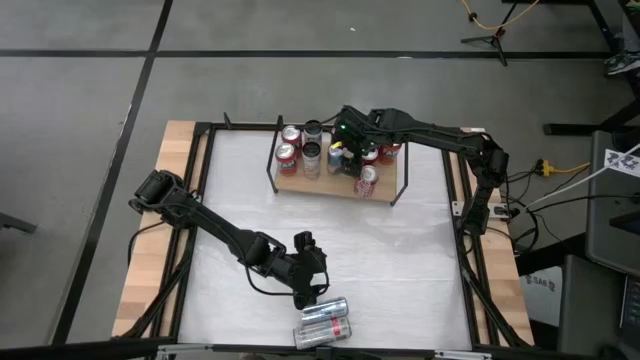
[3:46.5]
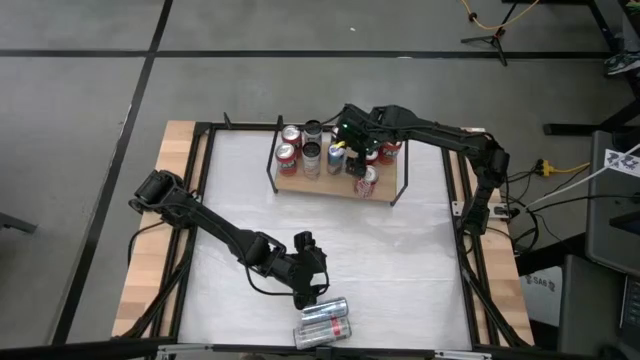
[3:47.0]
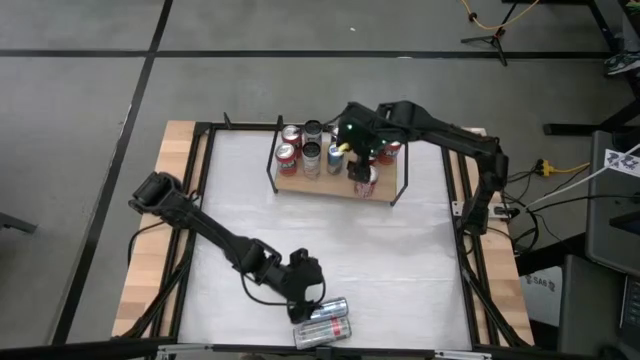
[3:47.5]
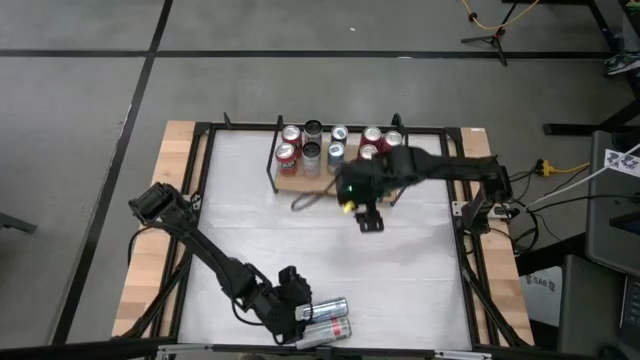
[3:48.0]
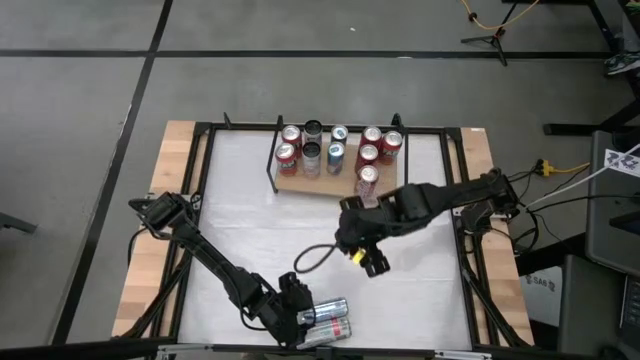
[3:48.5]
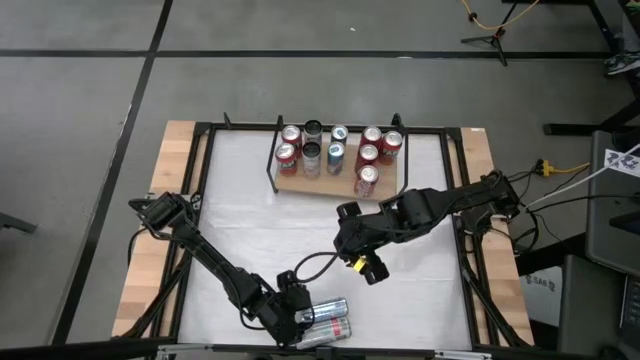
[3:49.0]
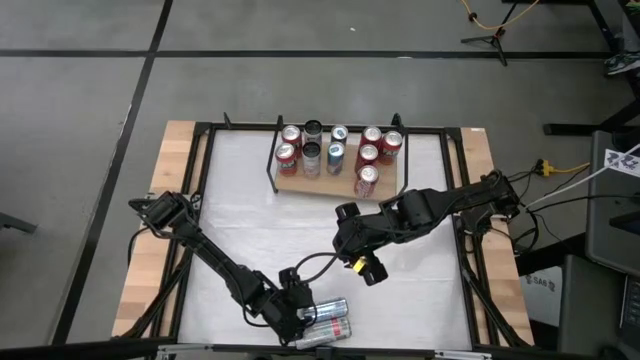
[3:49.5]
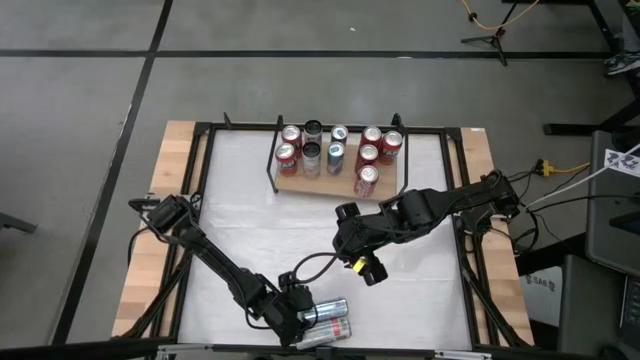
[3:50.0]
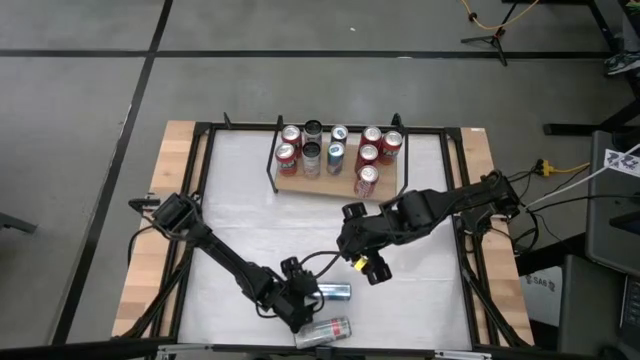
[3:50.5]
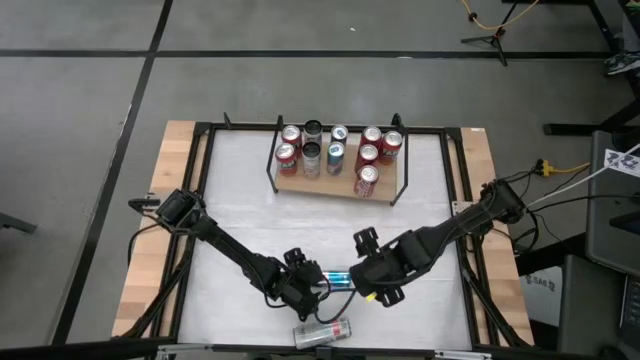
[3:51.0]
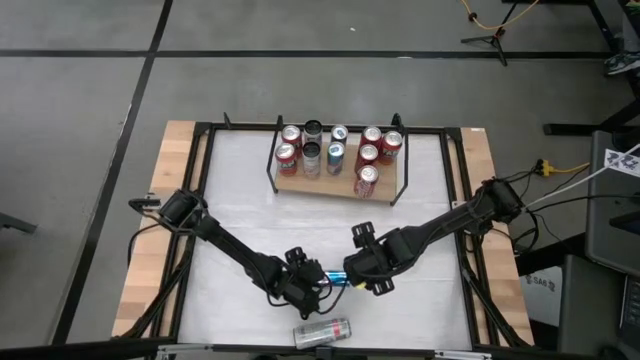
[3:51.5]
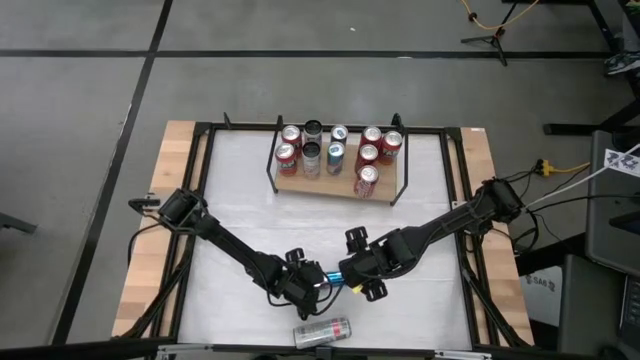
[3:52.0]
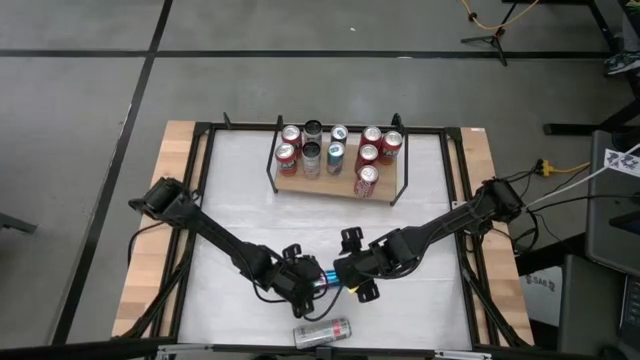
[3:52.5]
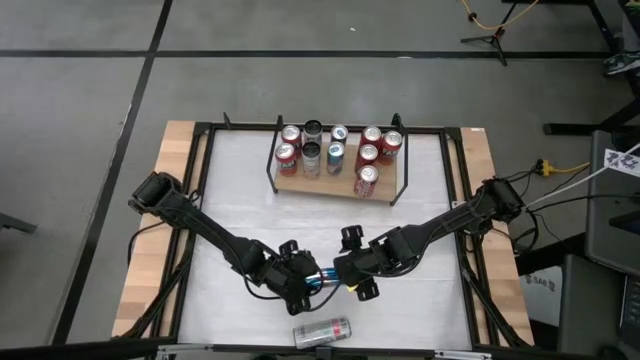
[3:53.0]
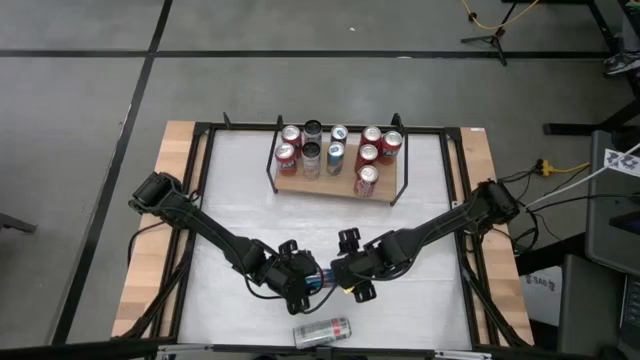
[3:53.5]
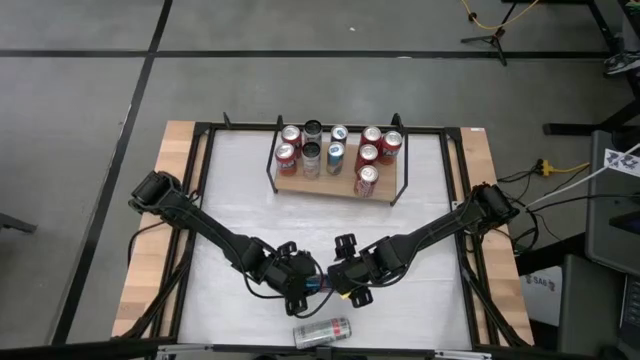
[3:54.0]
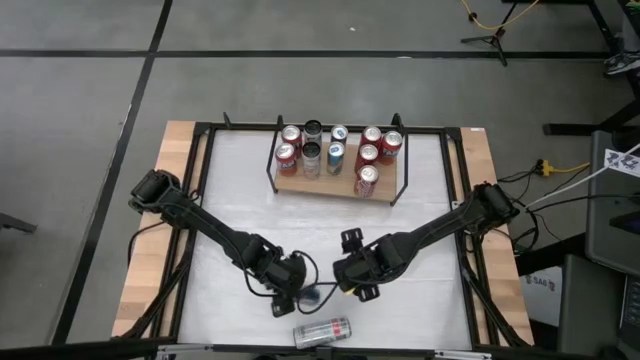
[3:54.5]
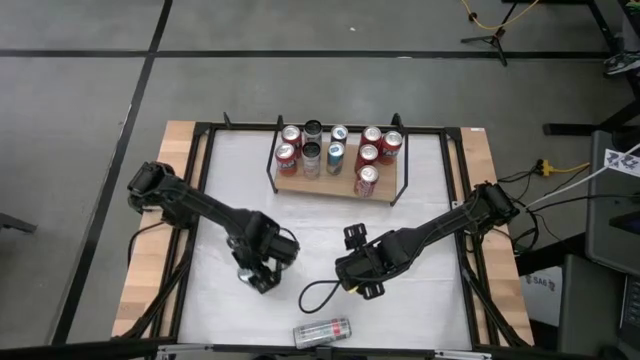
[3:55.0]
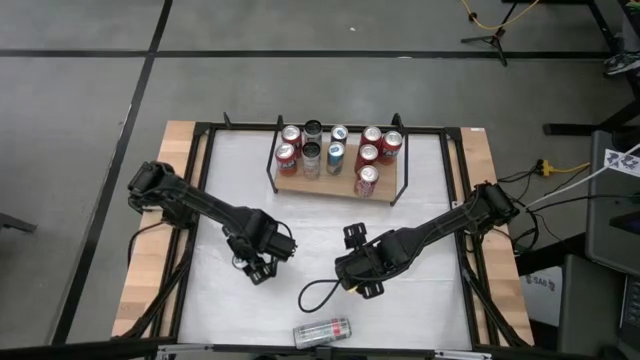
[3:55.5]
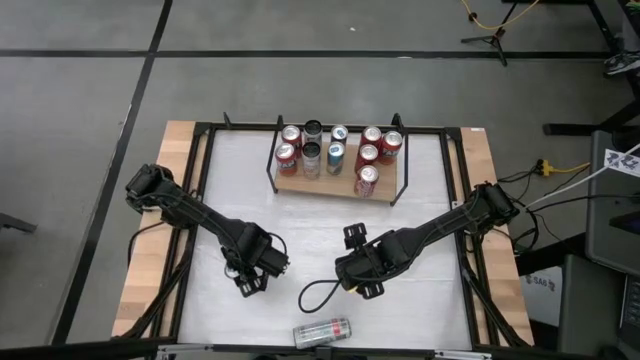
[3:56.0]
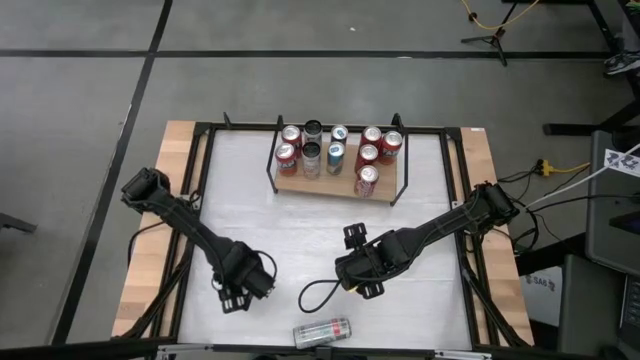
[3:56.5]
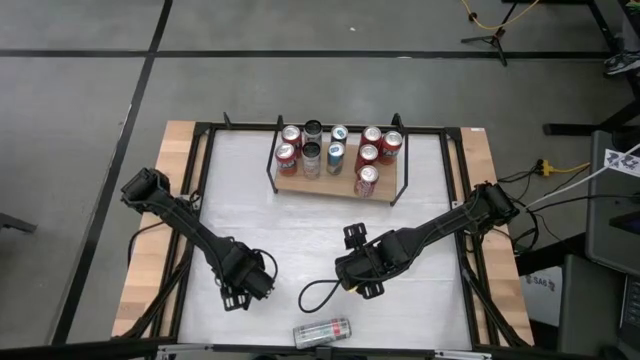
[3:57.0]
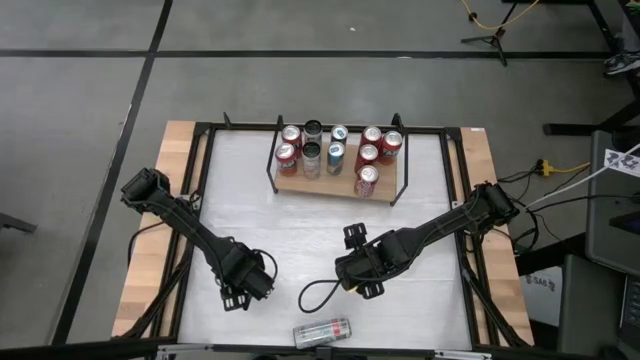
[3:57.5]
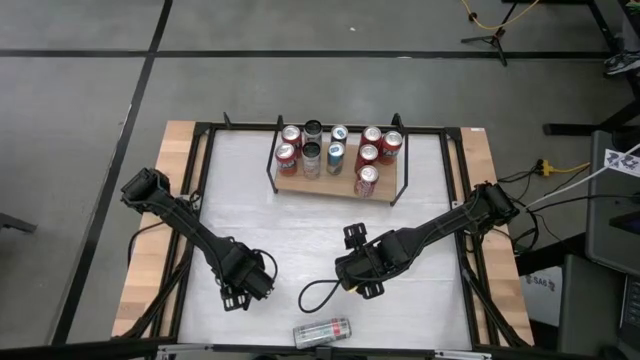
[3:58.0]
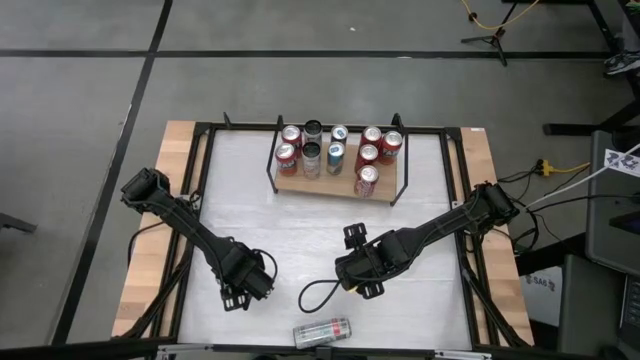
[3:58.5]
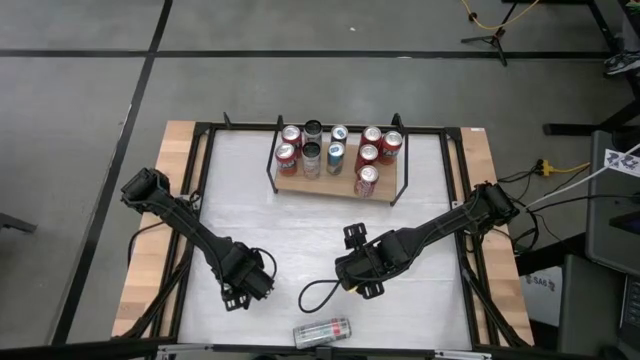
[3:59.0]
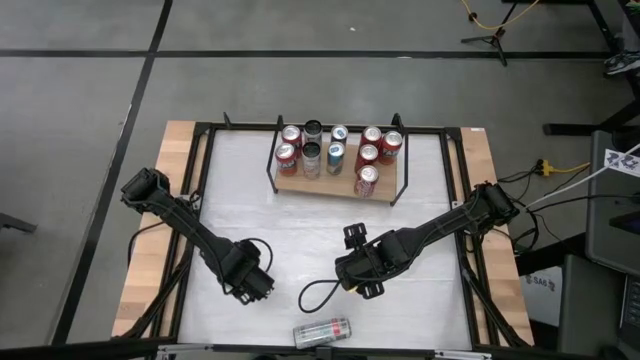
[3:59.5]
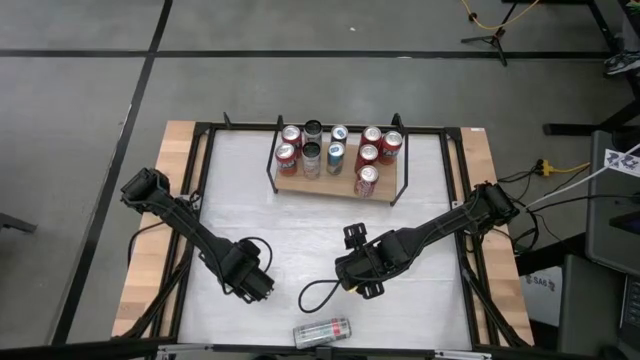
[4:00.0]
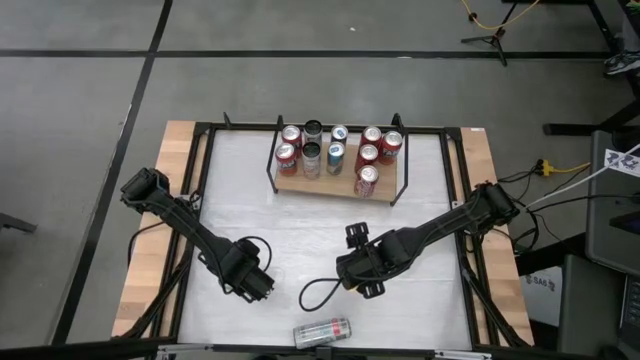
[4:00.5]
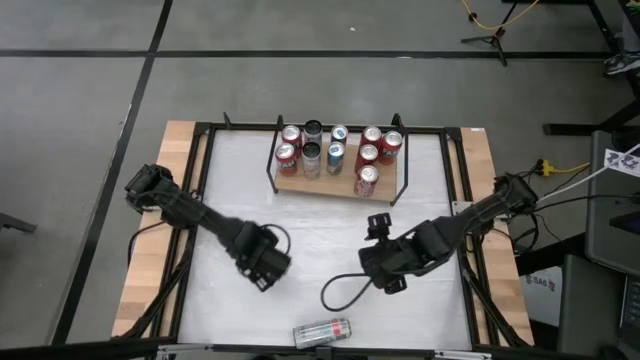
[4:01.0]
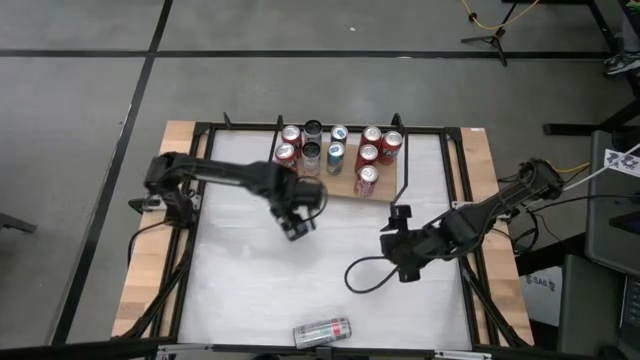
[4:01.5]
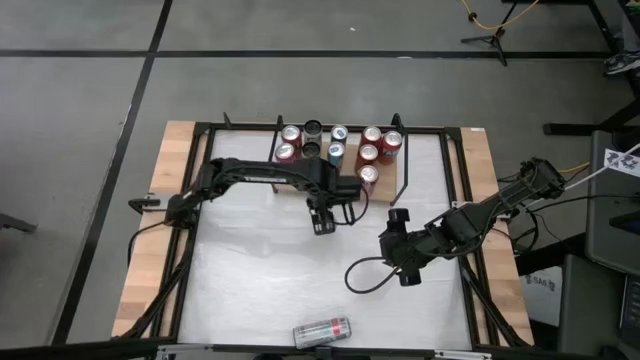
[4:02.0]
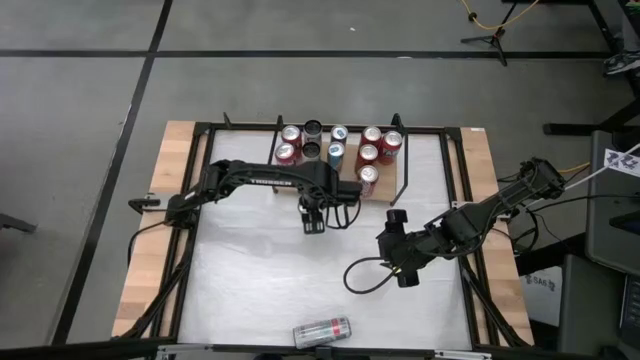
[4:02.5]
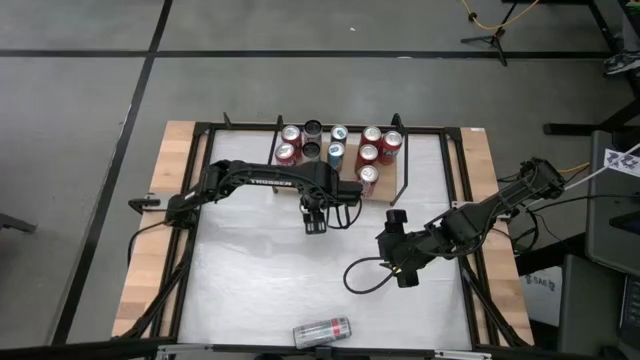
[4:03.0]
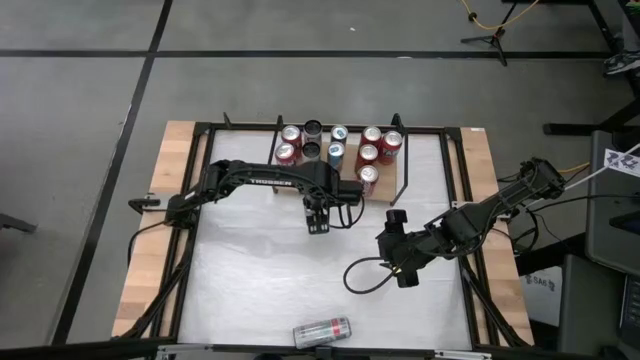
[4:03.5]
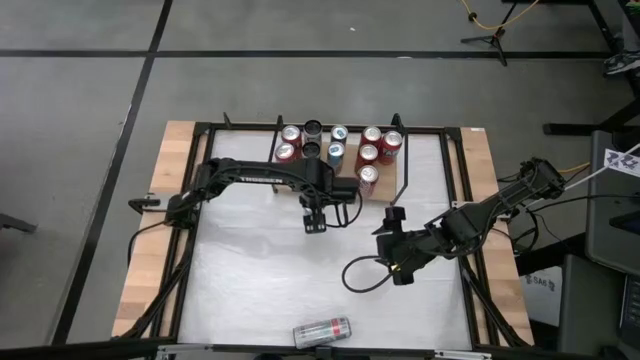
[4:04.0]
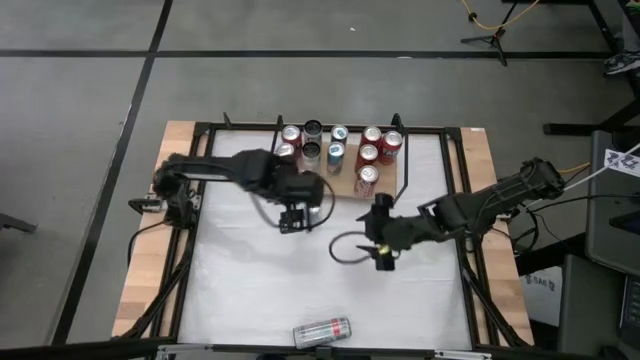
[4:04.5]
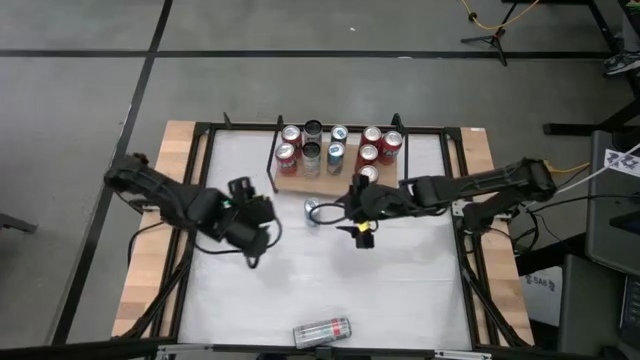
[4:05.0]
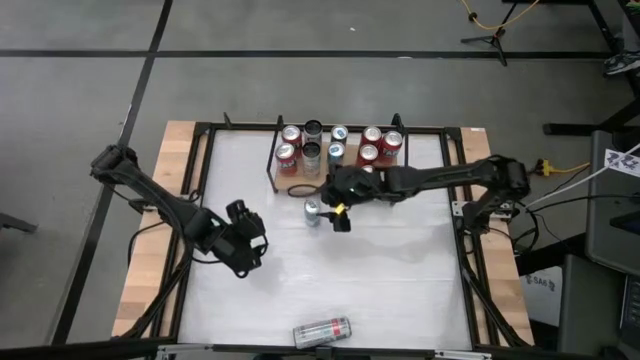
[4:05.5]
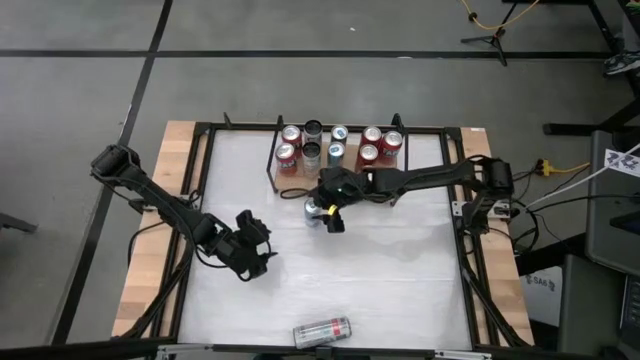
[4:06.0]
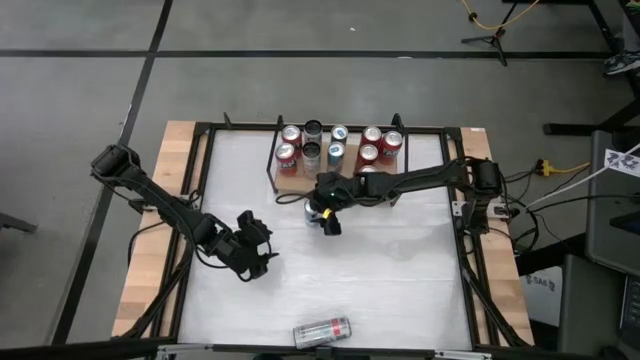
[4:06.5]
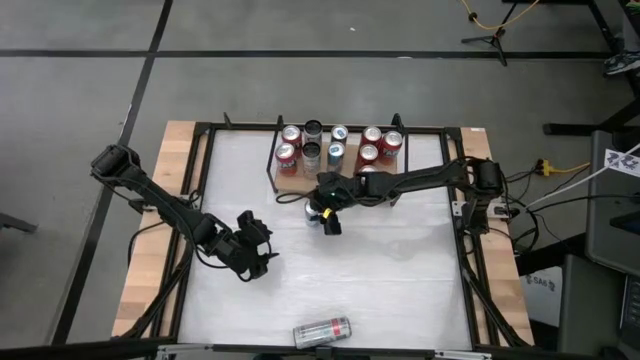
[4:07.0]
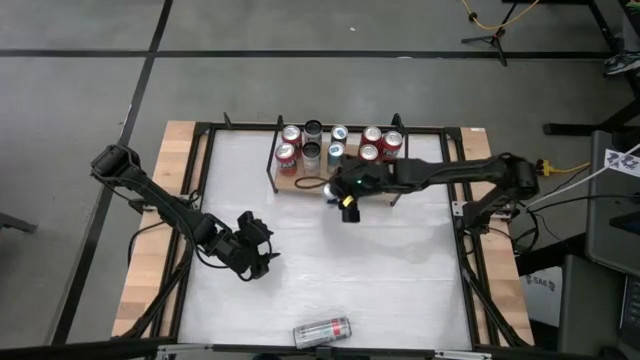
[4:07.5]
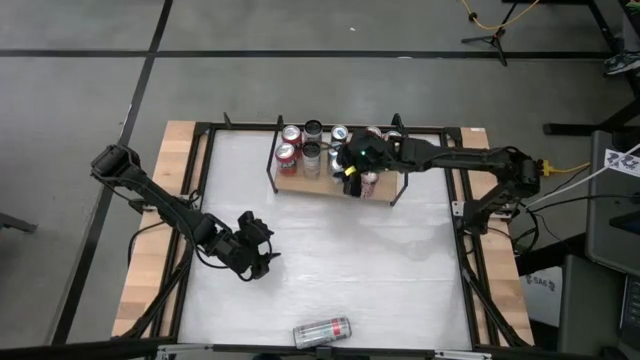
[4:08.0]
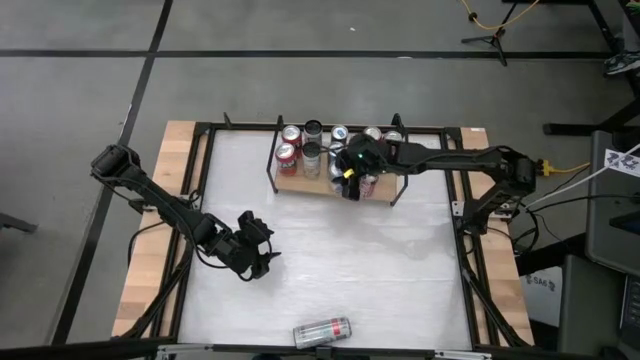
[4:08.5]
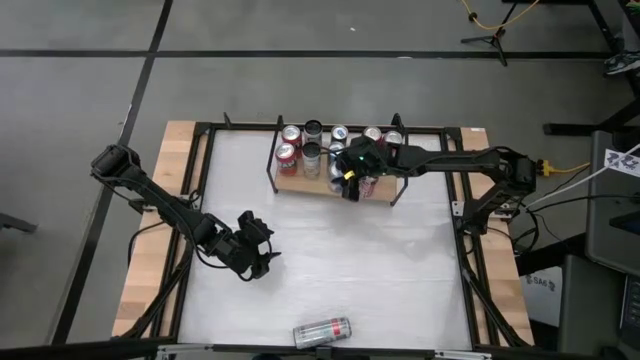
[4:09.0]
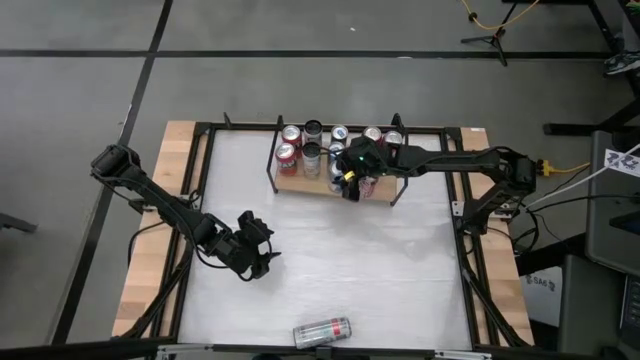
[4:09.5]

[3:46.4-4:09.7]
Task: Place canned beverage on shelf
Put the blue soda can on the shelf aligned with the blue soda cans
